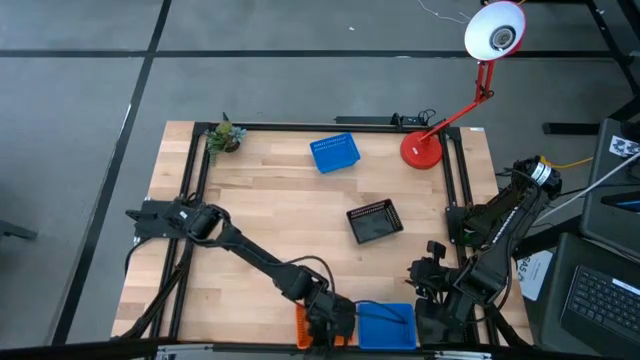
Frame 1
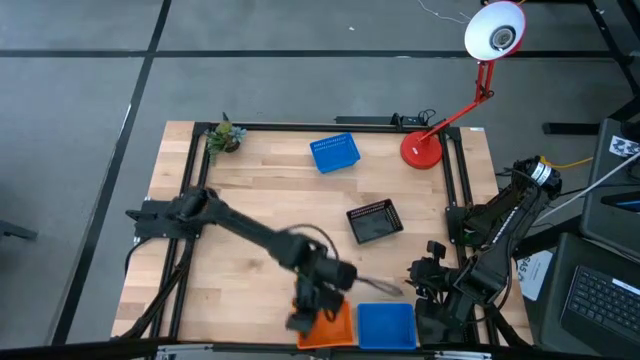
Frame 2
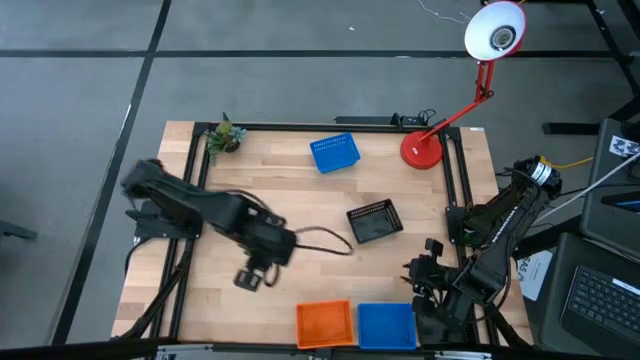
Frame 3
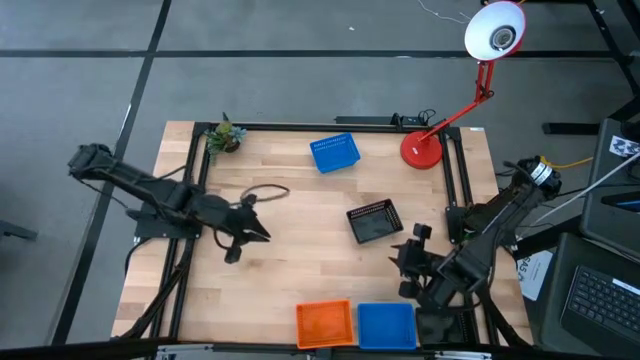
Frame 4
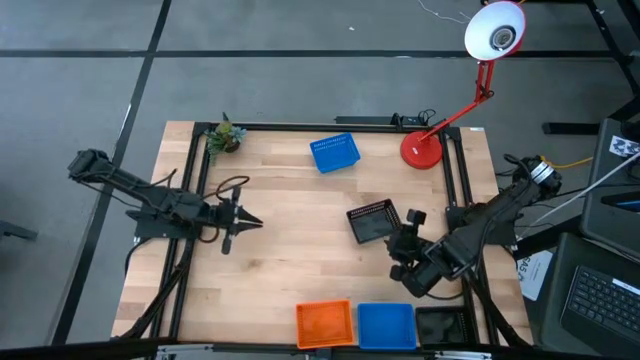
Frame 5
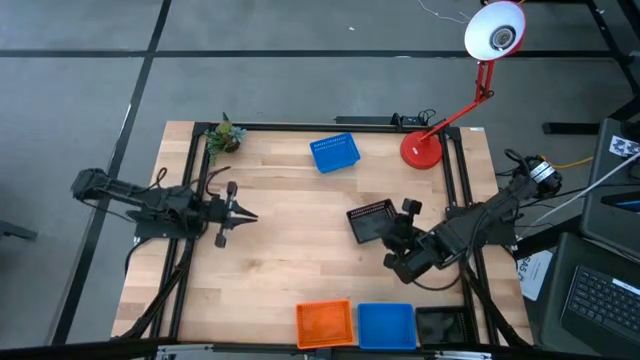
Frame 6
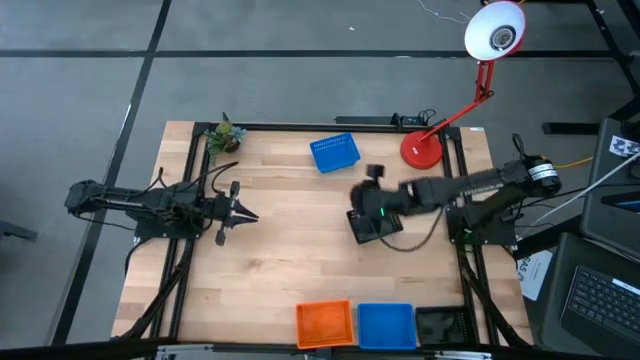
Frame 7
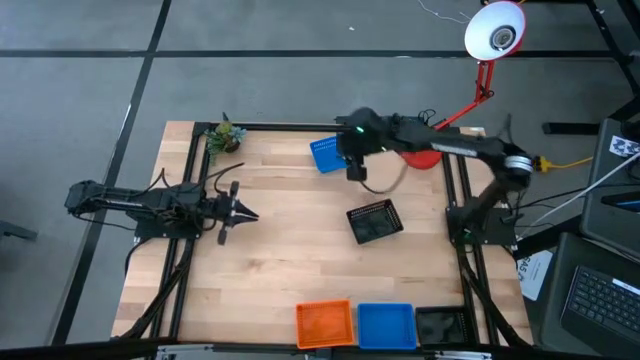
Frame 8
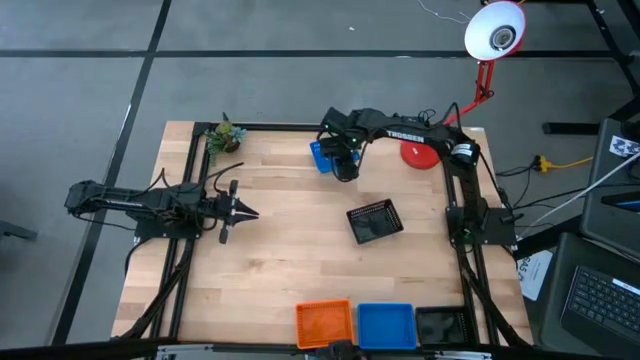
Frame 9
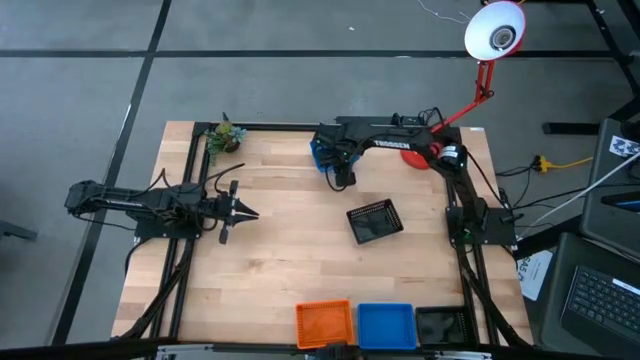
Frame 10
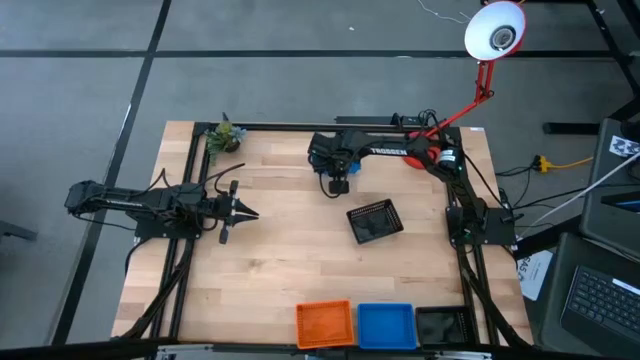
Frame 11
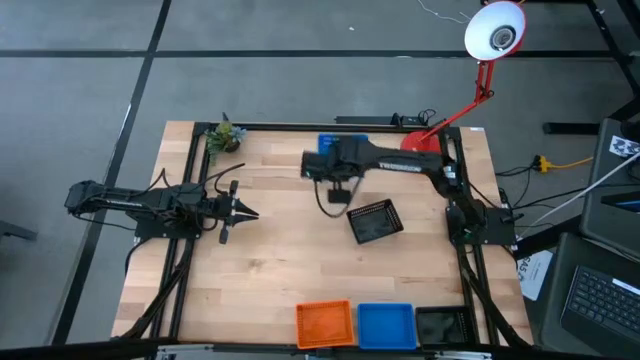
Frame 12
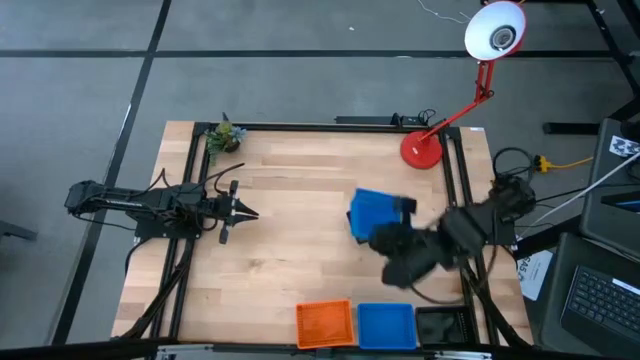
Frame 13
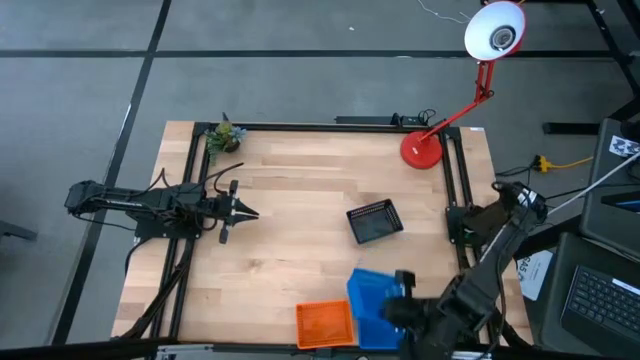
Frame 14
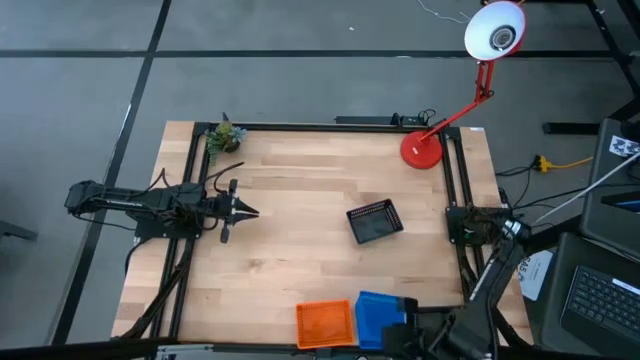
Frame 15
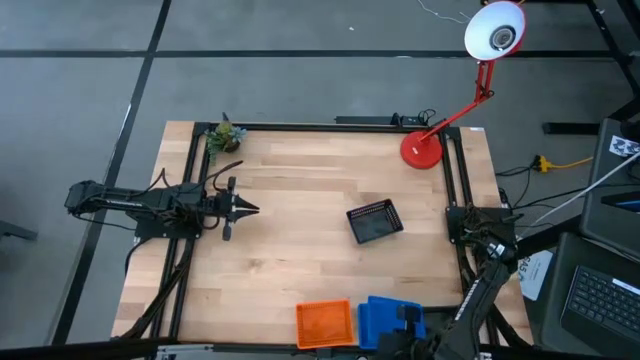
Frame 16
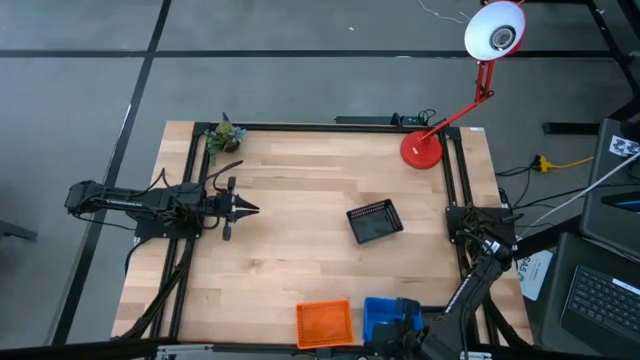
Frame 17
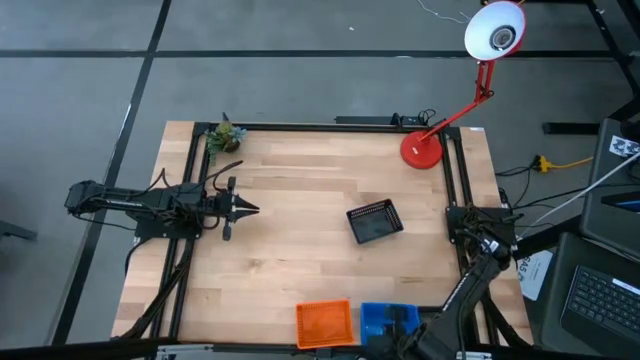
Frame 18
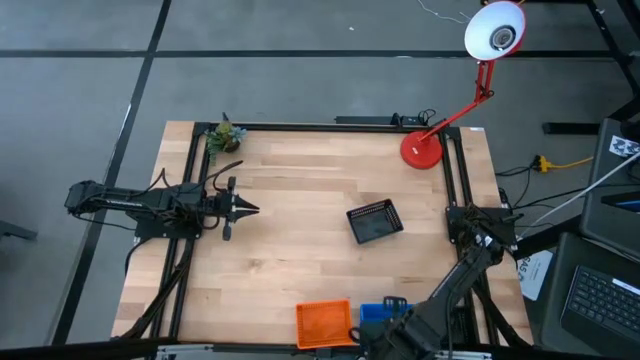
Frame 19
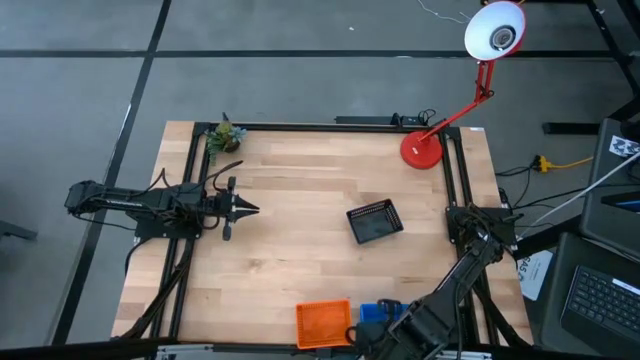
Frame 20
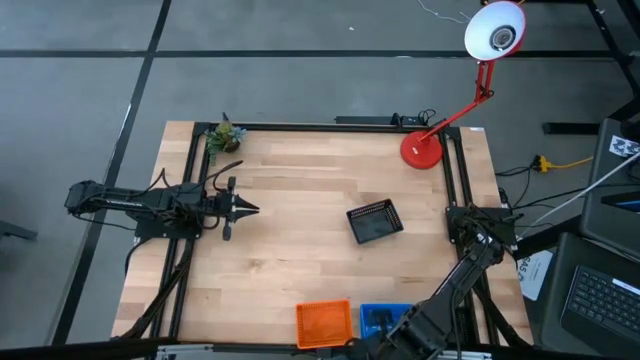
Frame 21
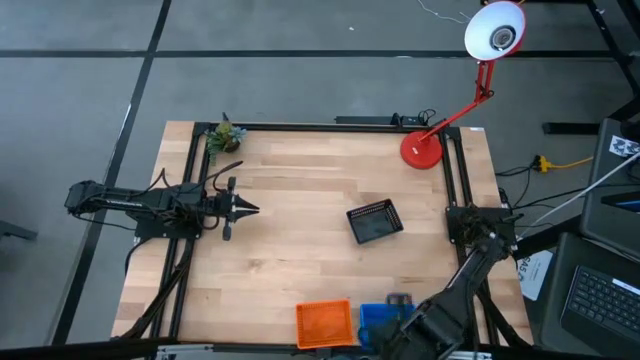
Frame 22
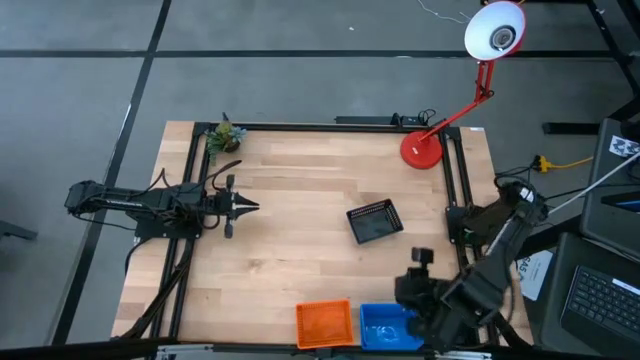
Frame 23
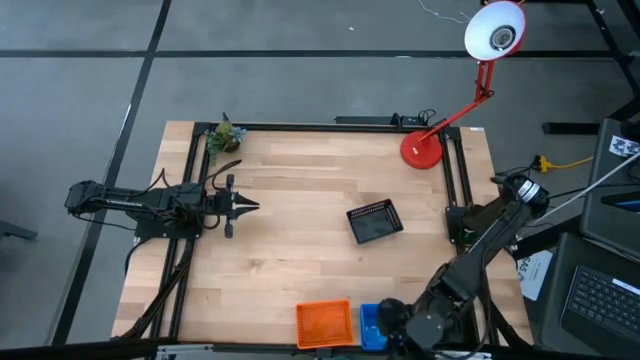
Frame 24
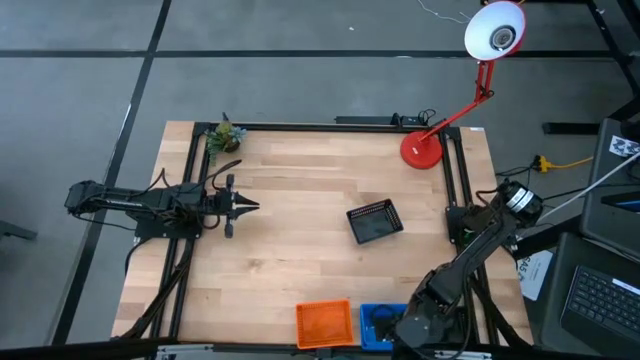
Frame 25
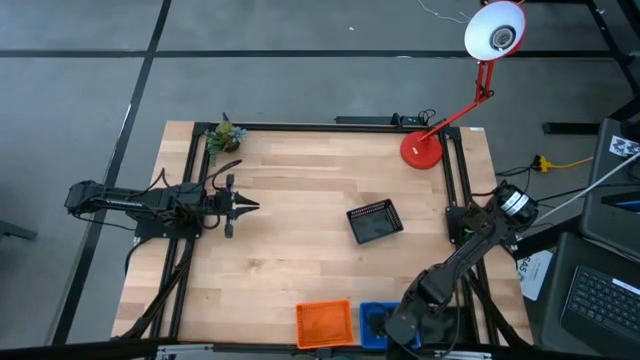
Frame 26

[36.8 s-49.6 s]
Stack the top blue bin on the bottom blue bin

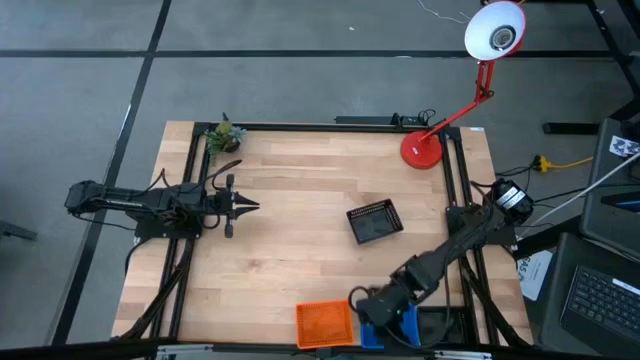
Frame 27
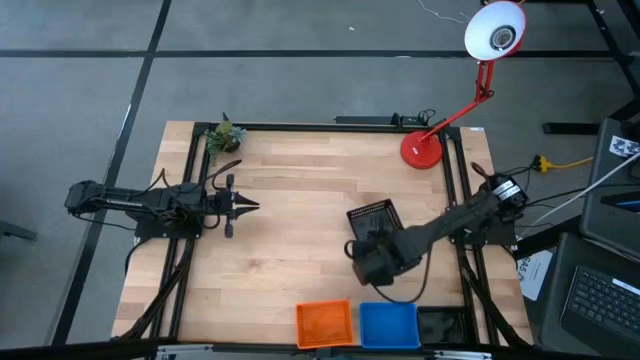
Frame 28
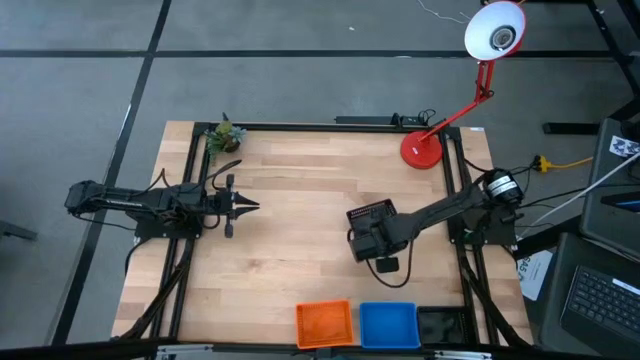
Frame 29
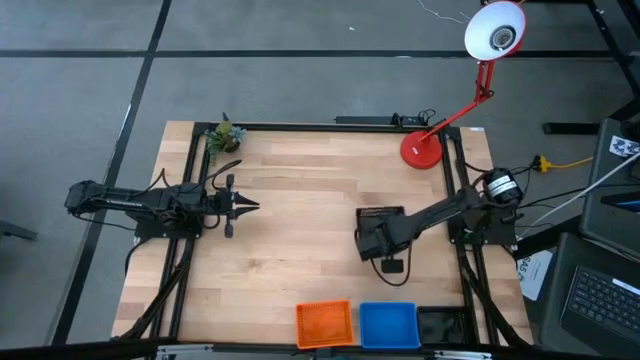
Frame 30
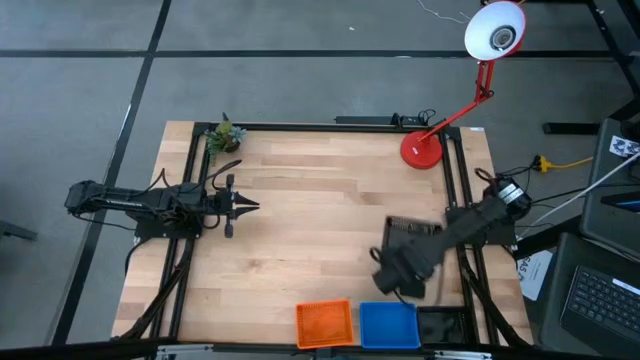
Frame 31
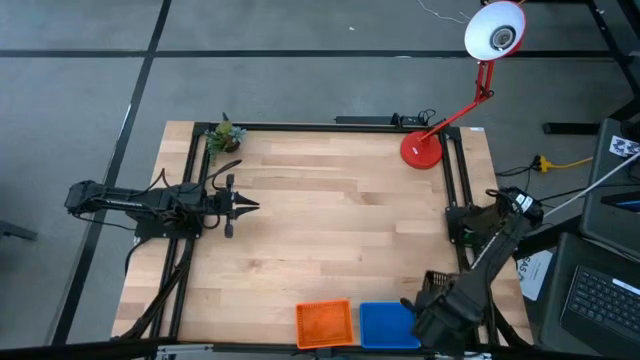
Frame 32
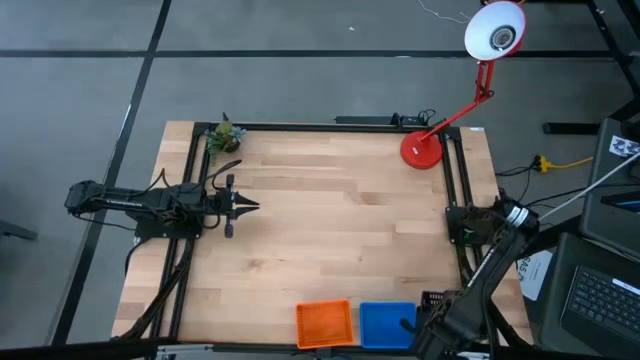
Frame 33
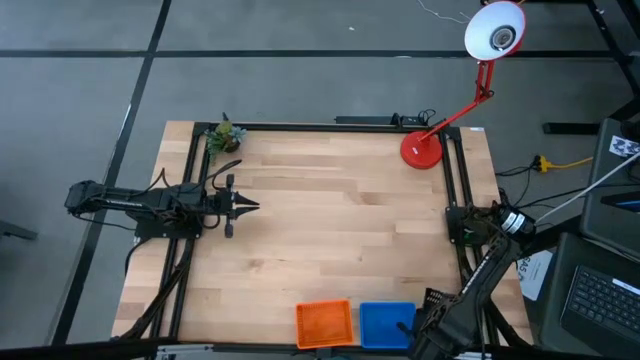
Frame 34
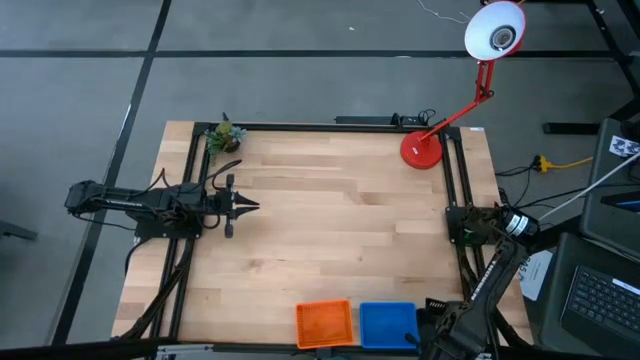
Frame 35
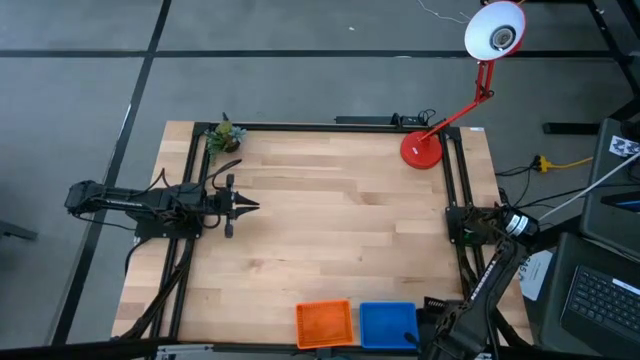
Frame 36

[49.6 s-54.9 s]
Stack the top black bin on the bottom black bin
